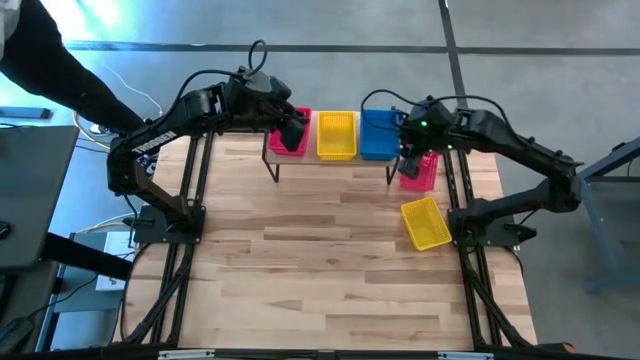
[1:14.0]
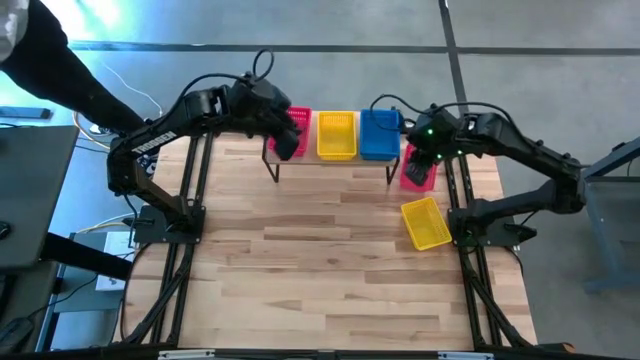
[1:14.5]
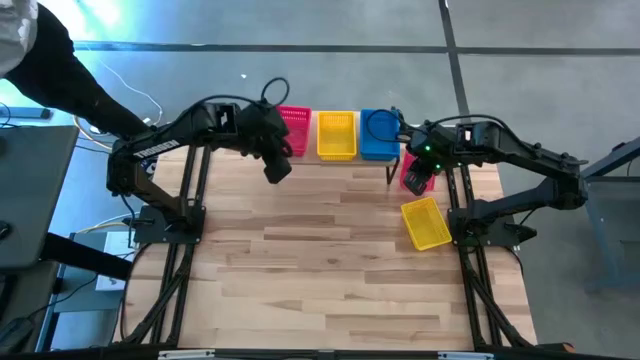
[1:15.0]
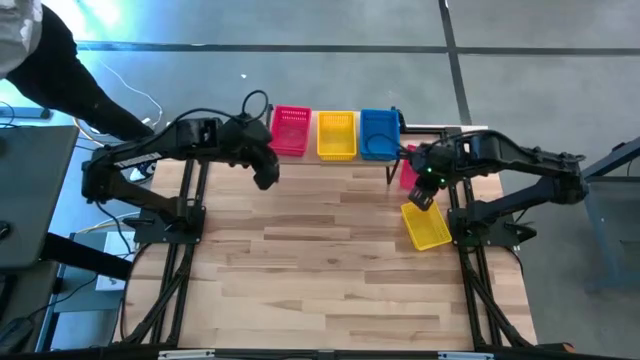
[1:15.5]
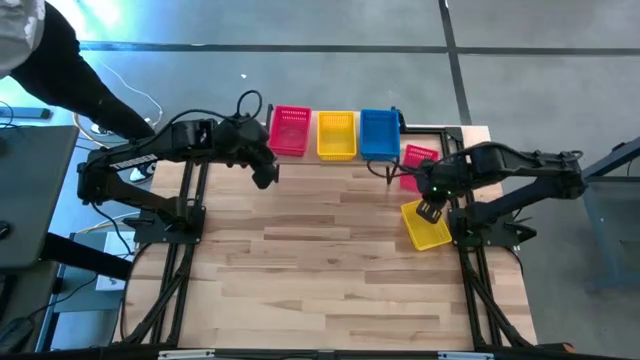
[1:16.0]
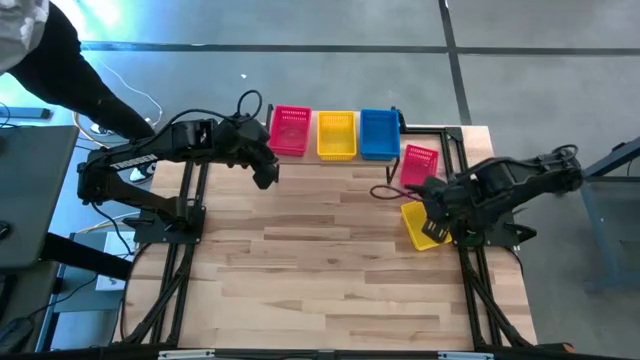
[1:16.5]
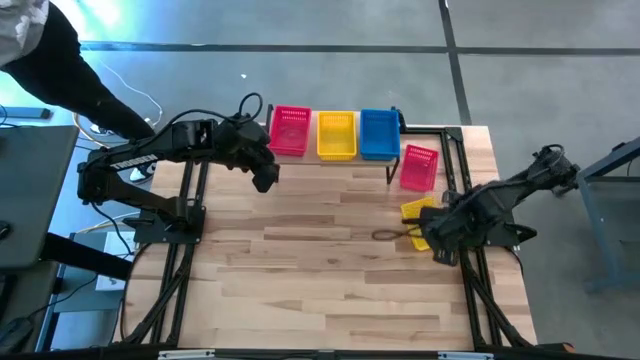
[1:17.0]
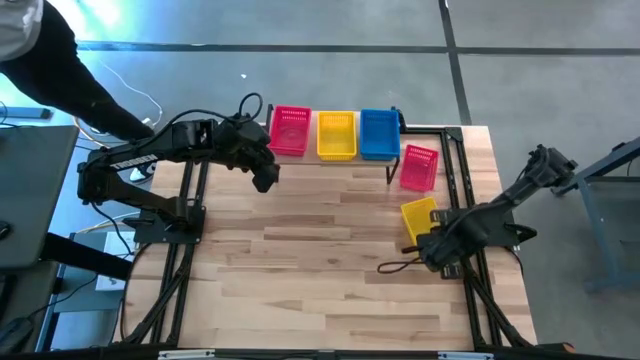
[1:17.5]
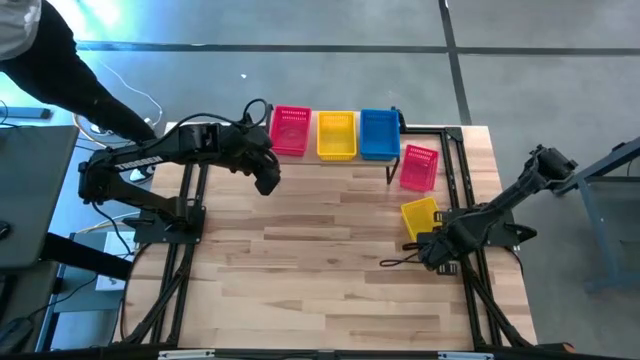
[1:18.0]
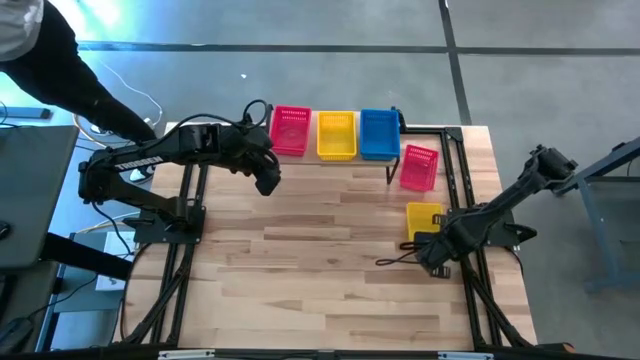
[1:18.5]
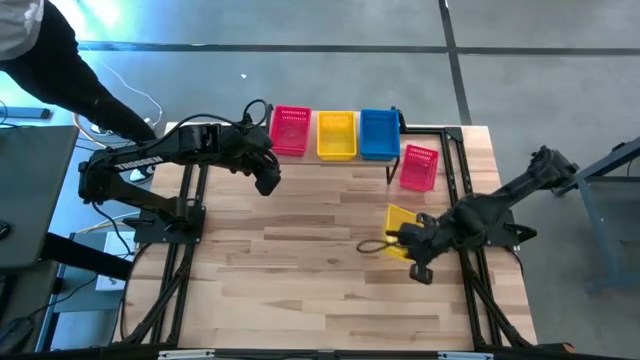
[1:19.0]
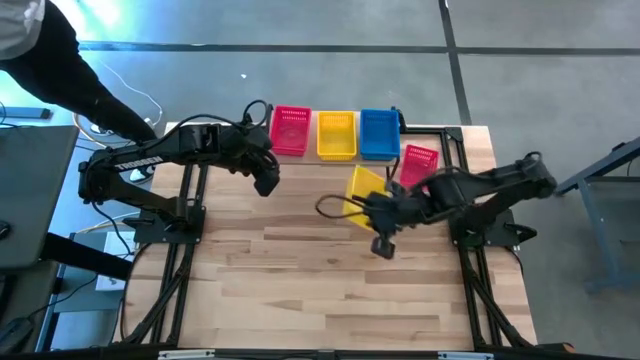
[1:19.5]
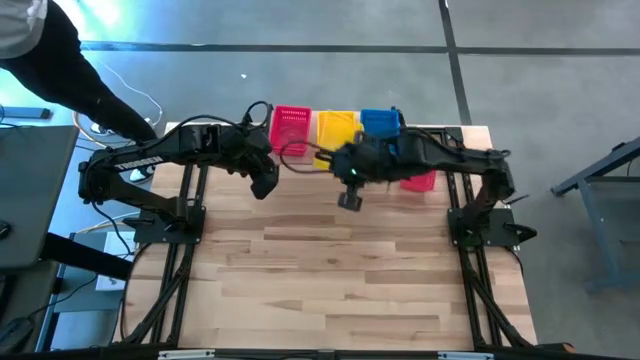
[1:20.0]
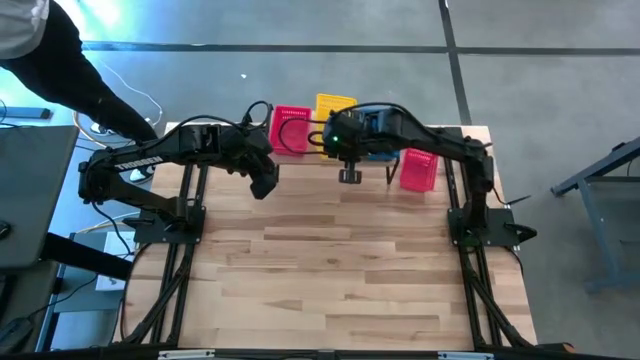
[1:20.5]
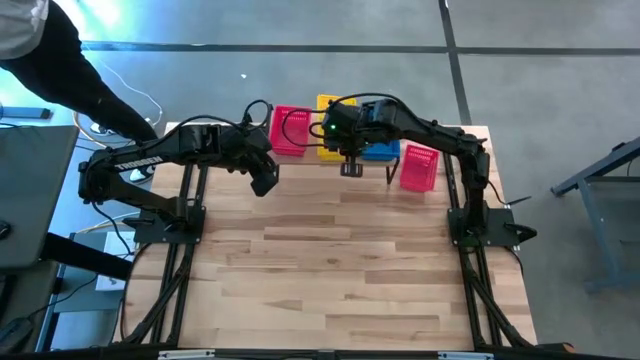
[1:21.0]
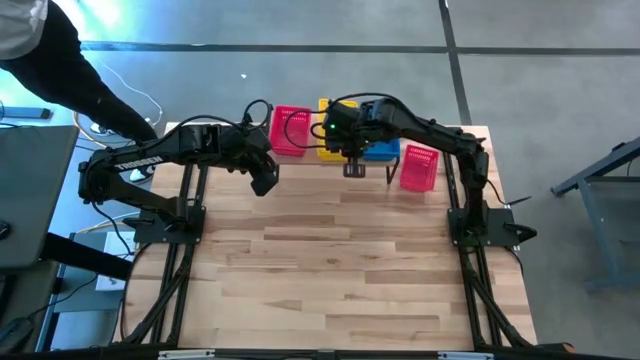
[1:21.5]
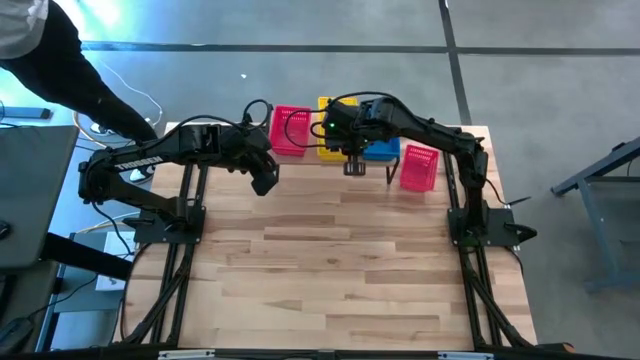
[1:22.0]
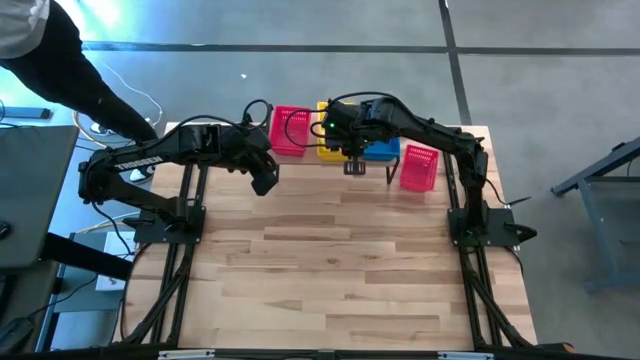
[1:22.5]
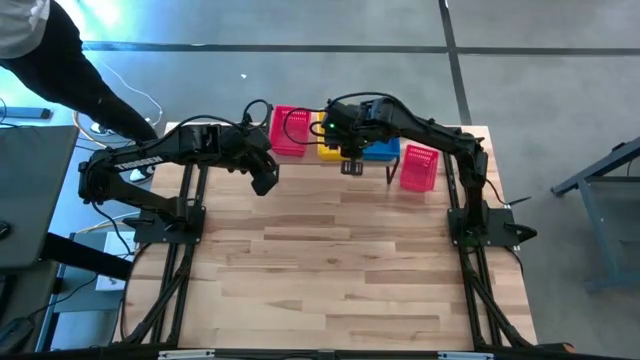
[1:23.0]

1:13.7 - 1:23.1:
Task: Stack baskets on shelf by color
Stack the yellow basket on top of the yellow basket on the shelf

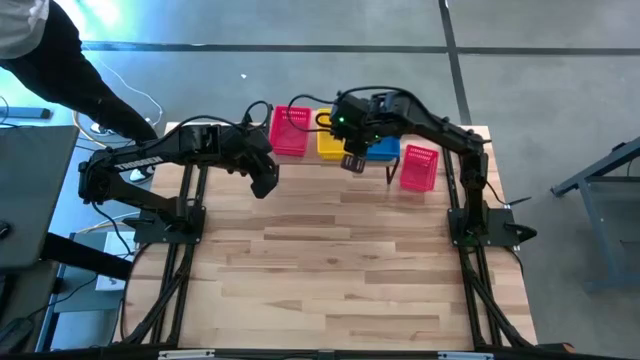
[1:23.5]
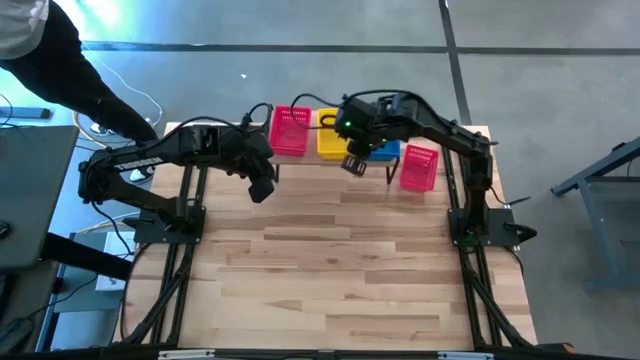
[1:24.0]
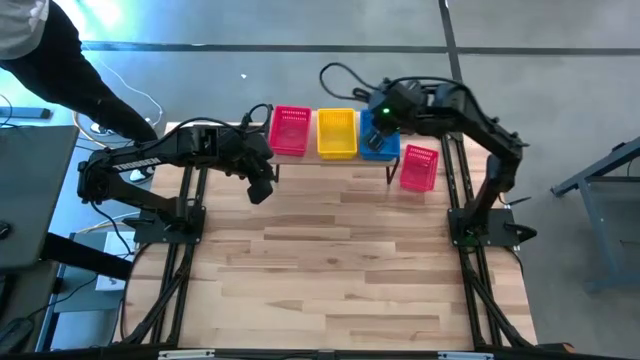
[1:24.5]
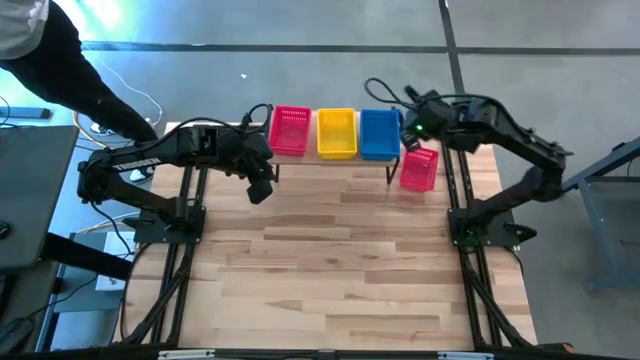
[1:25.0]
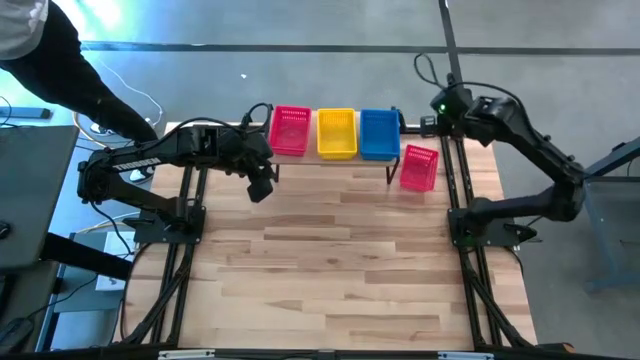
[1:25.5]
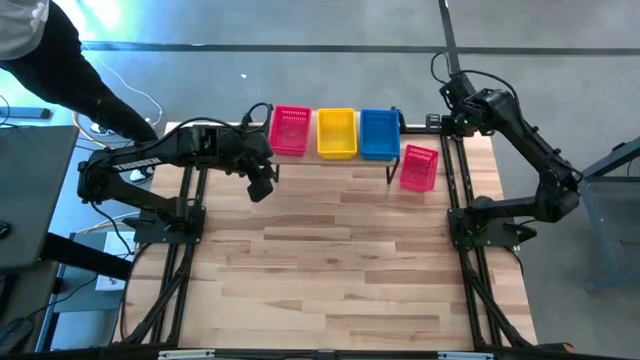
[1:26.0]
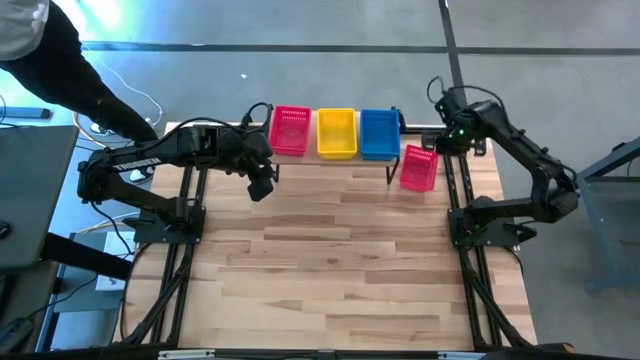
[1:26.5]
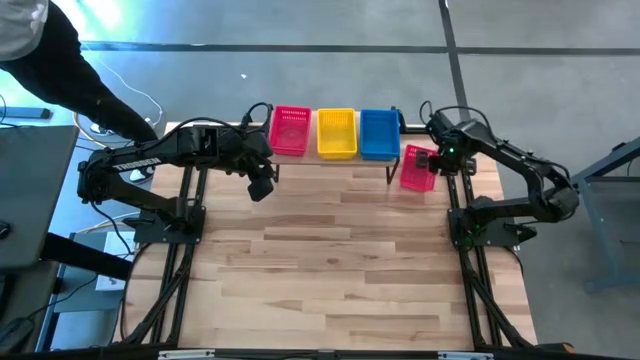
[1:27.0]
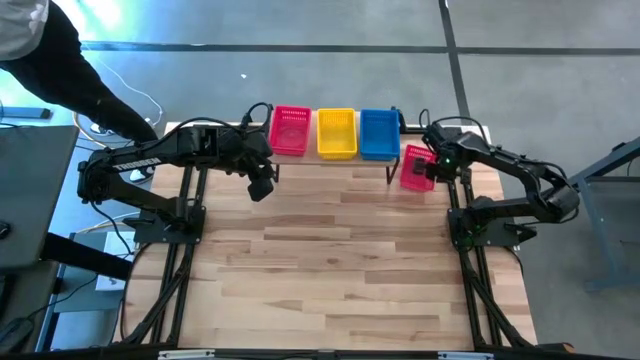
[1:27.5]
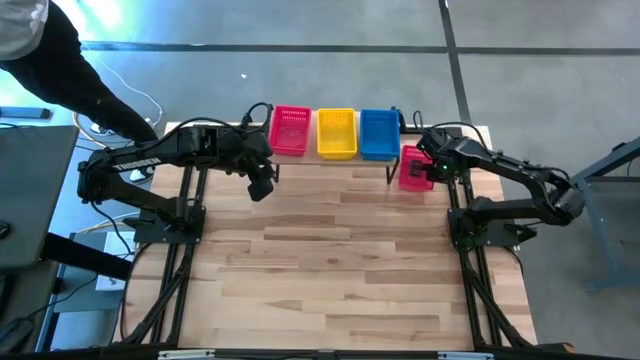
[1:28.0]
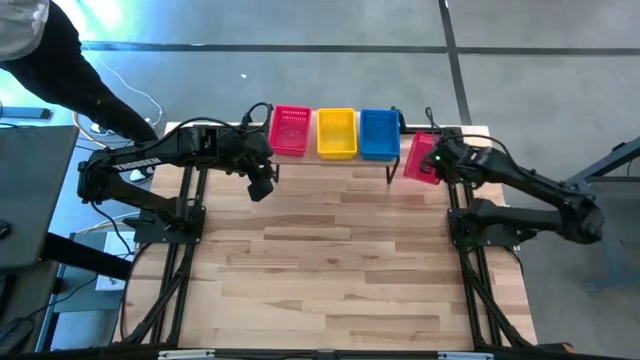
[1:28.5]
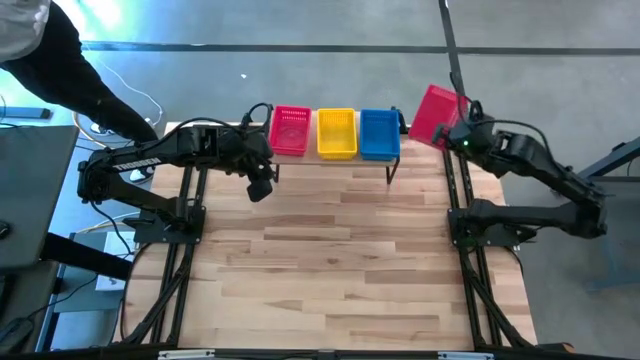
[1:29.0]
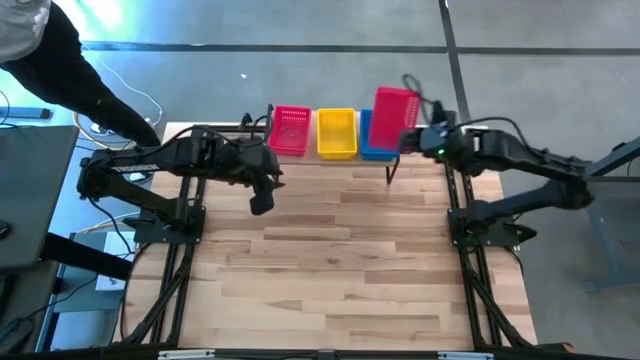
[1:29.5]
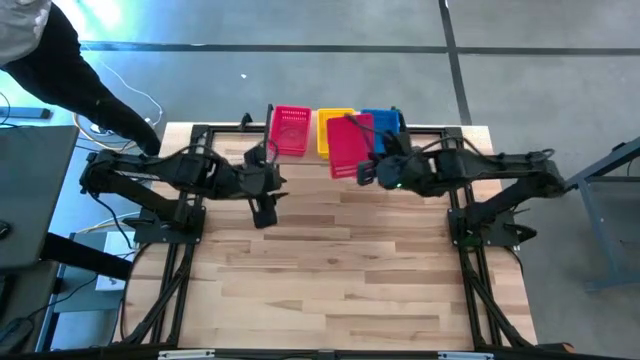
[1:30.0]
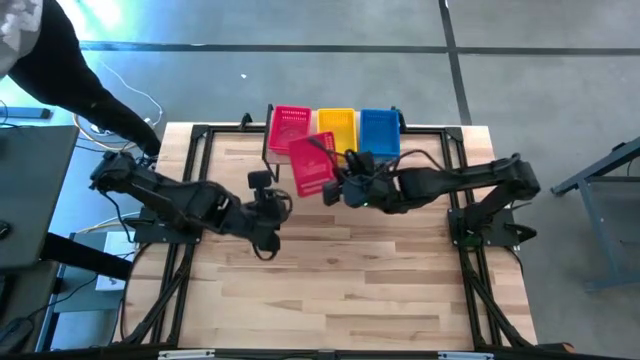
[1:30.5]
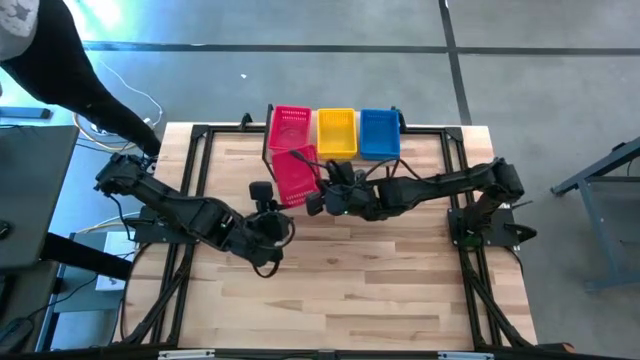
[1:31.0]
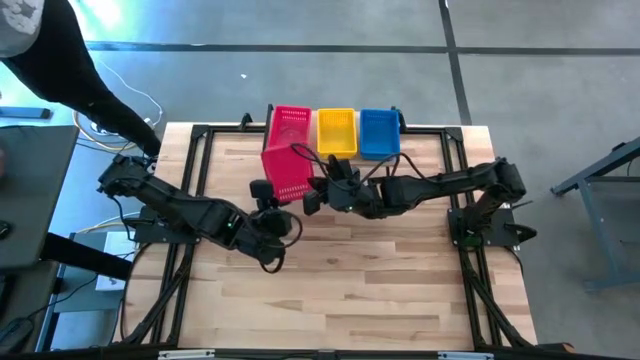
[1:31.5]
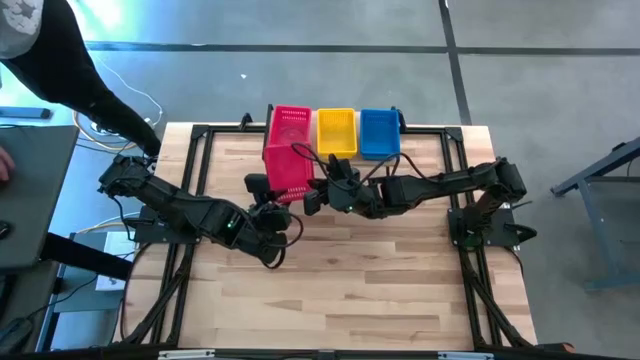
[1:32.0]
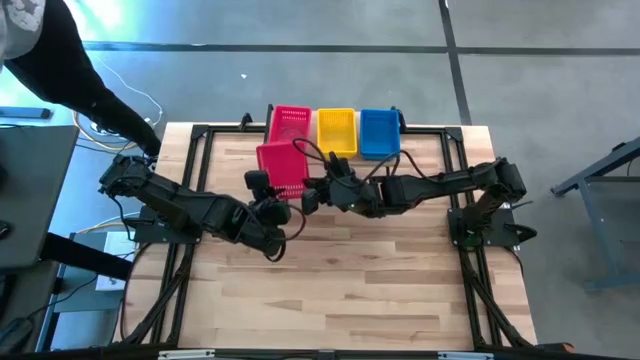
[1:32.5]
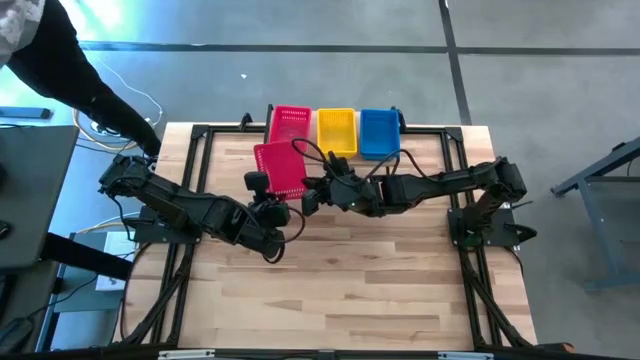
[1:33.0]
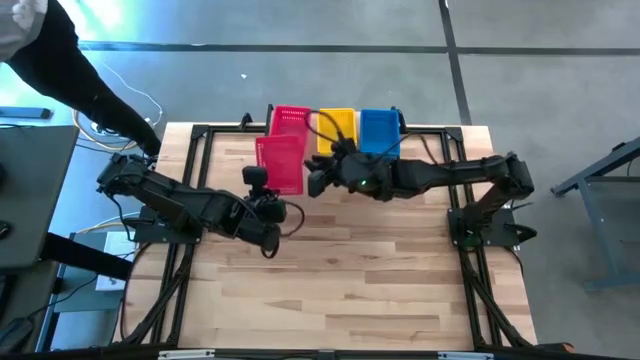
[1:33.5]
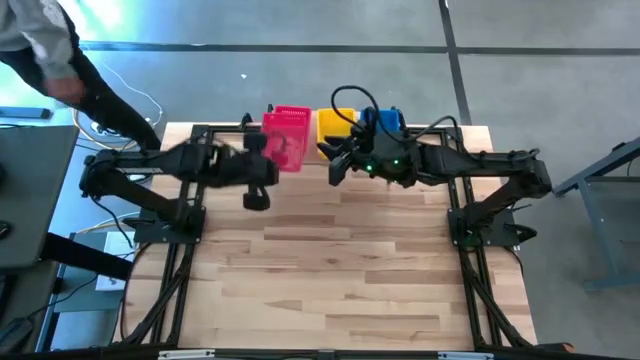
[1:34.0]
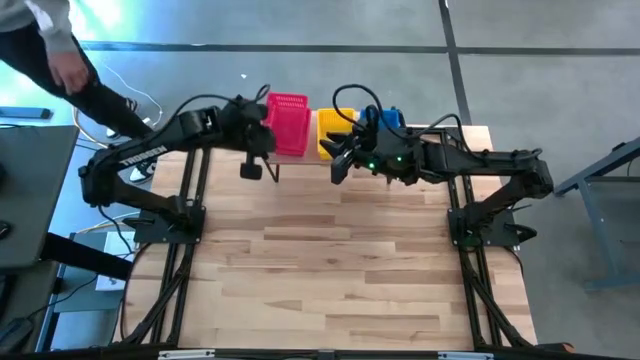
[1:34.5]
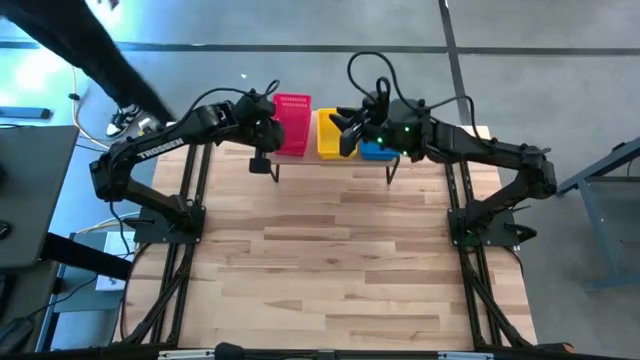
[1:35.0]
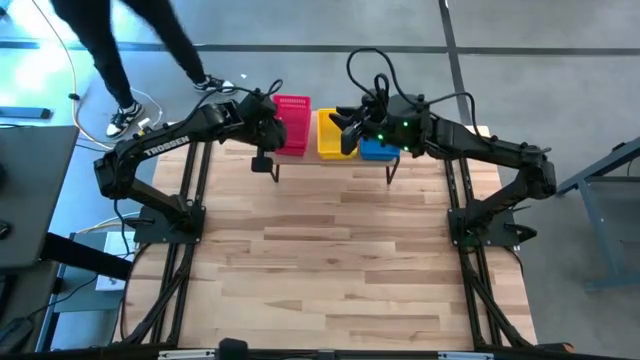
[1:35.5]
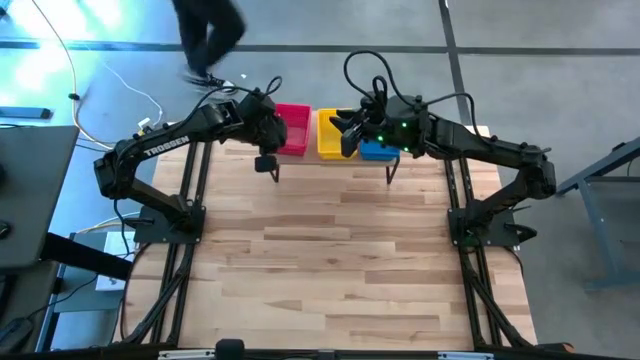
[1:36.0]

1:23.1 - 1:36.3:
Stack the red basket on top of the red basket on the shelf

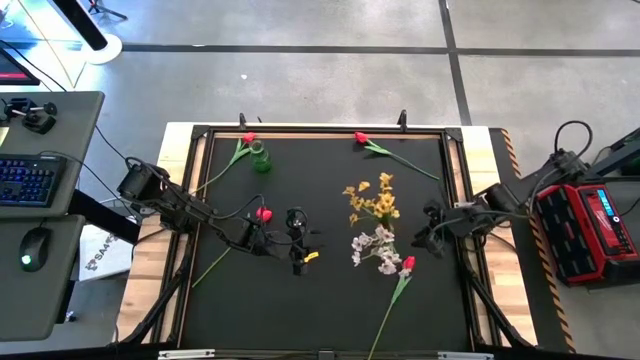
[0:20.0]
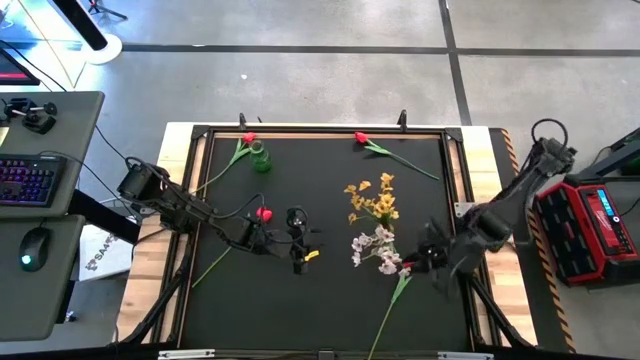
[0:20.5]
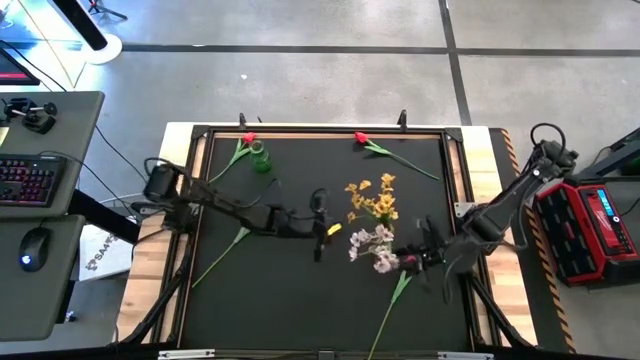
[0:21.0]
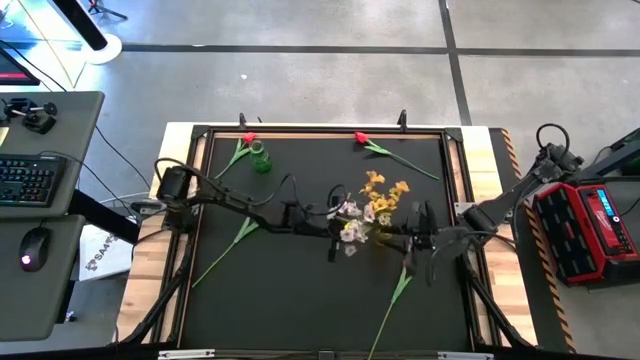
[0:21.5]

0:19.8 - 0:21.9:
Task: Sort flowers into vase by color
Adjust the white flowers into the yellow vase
